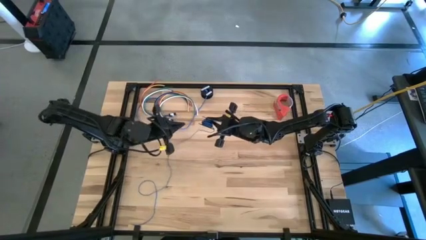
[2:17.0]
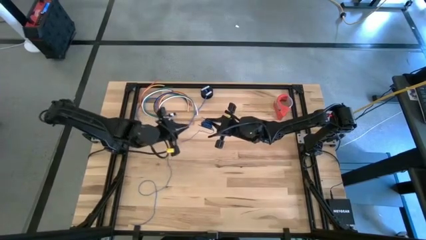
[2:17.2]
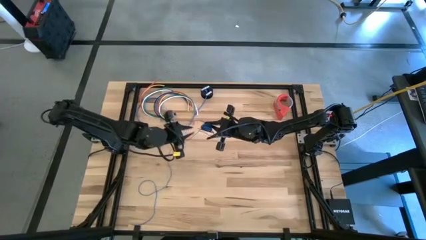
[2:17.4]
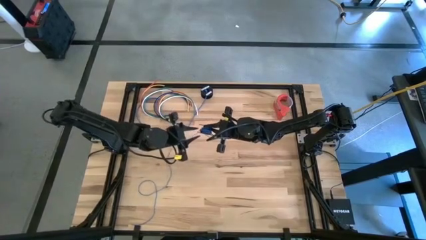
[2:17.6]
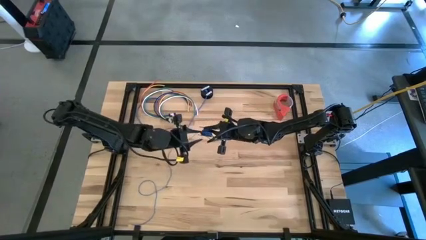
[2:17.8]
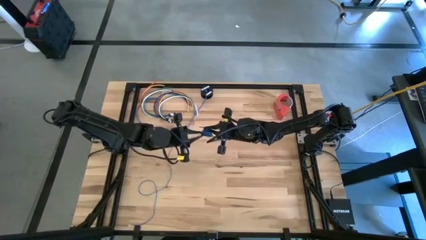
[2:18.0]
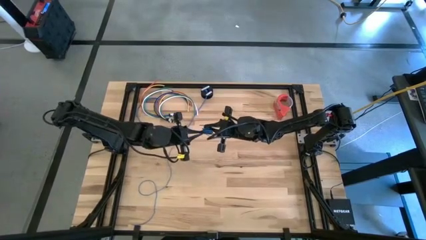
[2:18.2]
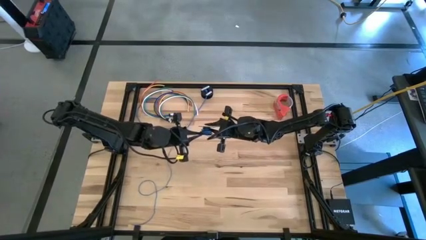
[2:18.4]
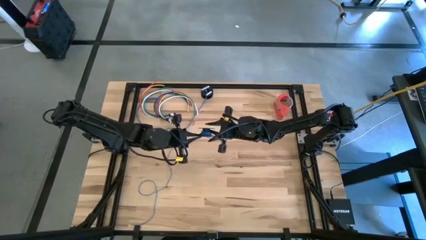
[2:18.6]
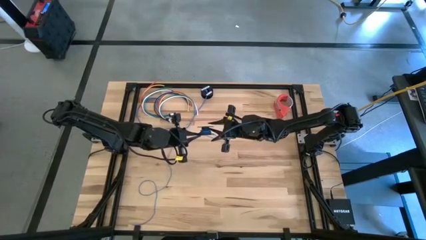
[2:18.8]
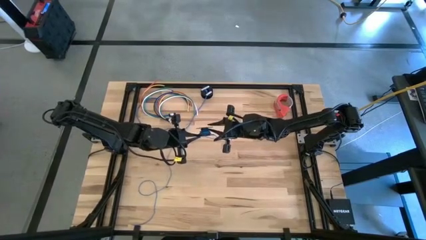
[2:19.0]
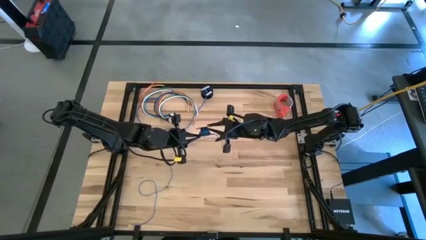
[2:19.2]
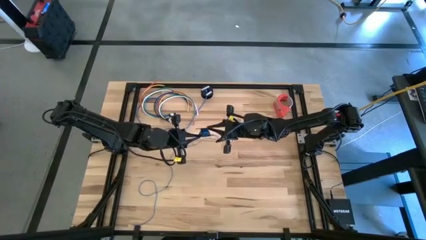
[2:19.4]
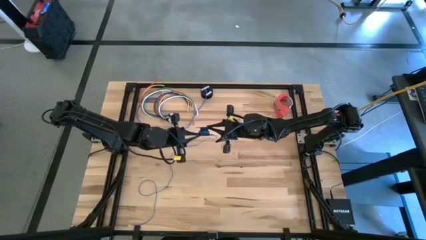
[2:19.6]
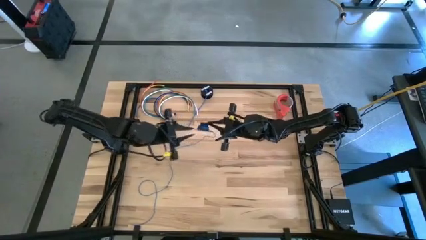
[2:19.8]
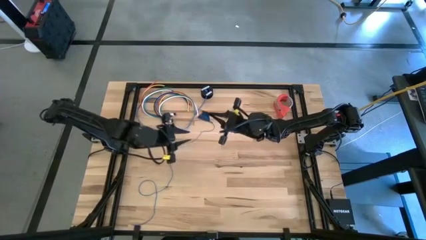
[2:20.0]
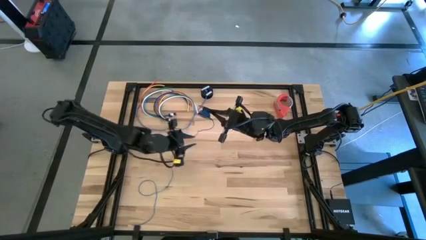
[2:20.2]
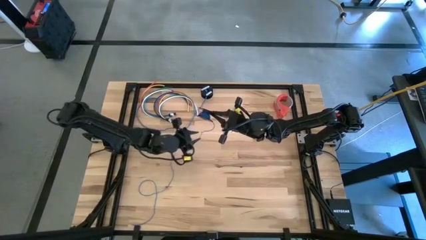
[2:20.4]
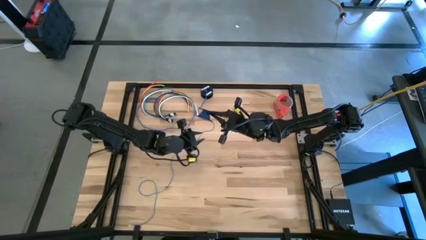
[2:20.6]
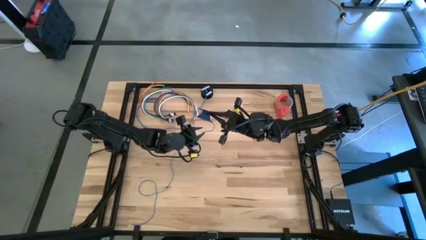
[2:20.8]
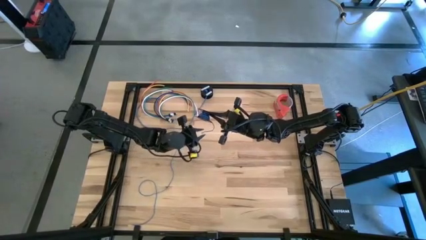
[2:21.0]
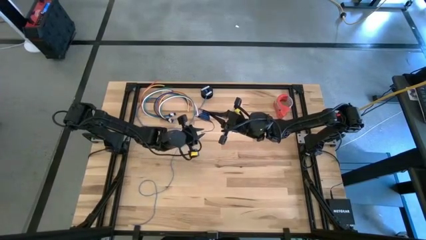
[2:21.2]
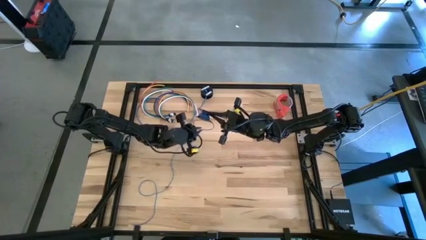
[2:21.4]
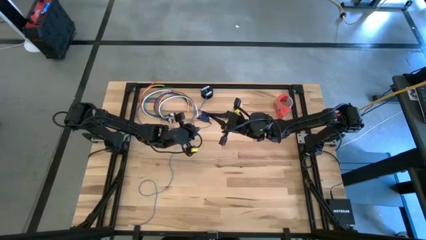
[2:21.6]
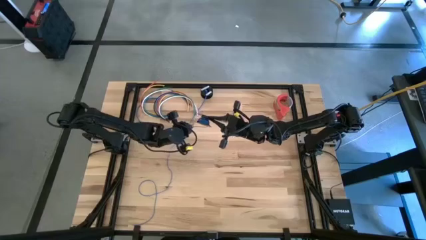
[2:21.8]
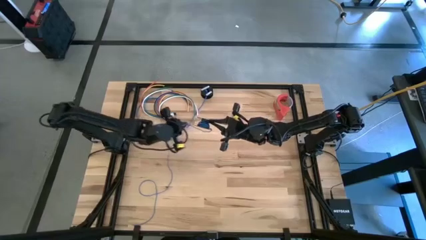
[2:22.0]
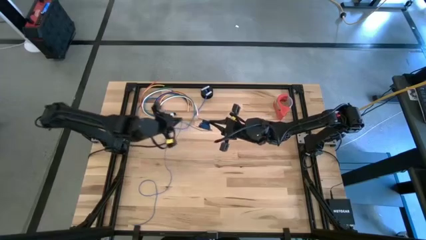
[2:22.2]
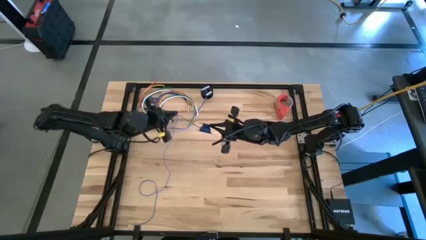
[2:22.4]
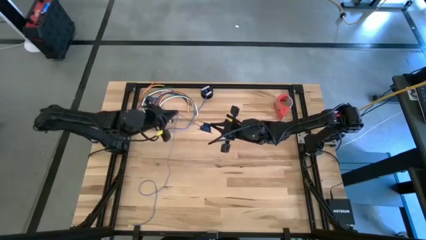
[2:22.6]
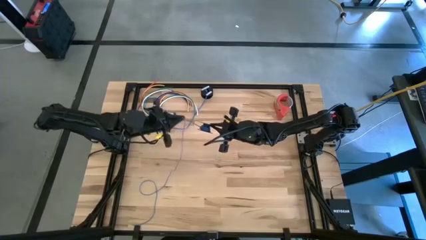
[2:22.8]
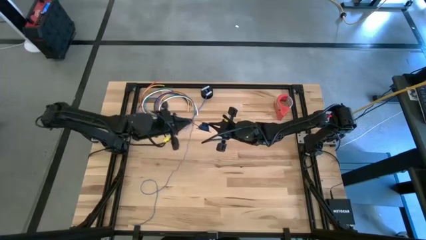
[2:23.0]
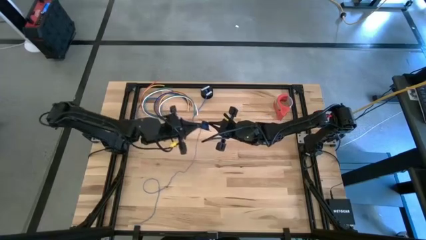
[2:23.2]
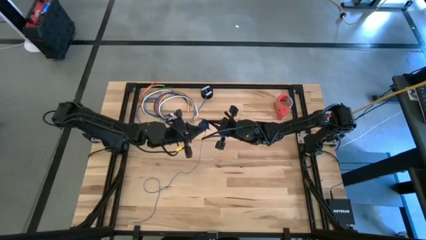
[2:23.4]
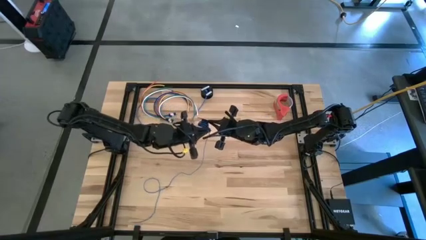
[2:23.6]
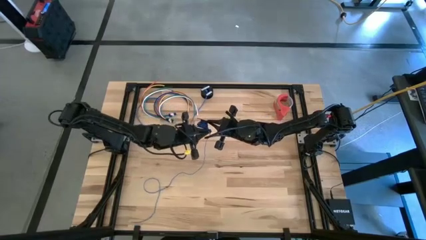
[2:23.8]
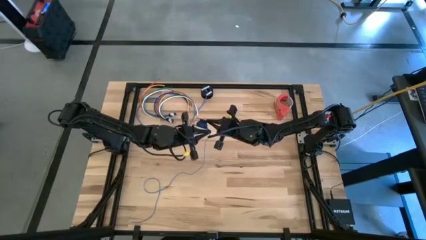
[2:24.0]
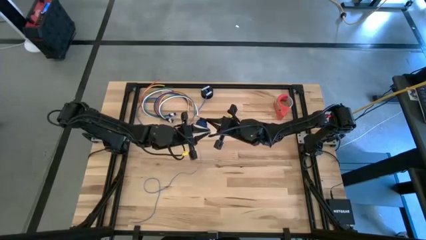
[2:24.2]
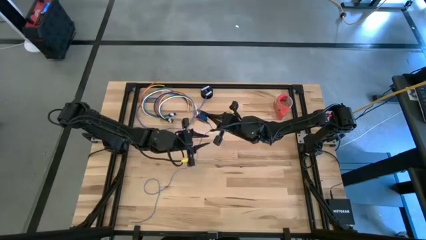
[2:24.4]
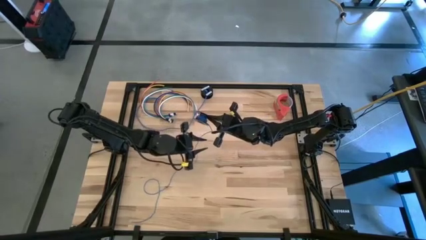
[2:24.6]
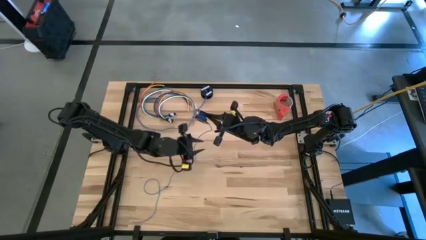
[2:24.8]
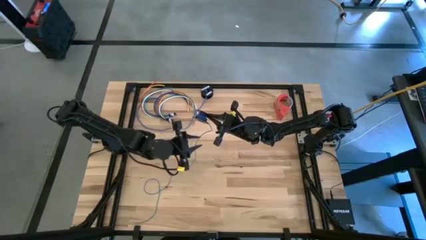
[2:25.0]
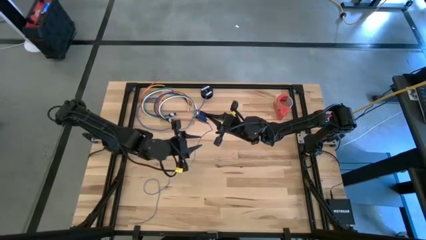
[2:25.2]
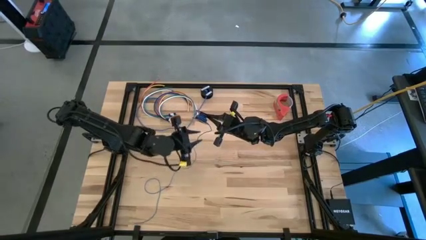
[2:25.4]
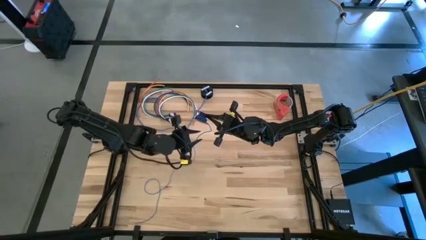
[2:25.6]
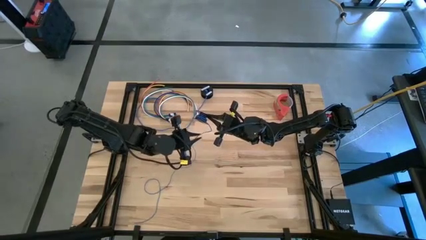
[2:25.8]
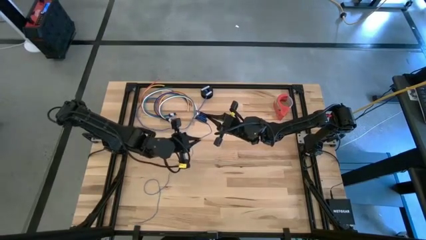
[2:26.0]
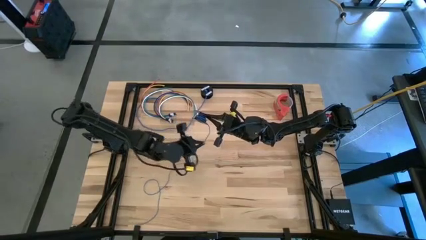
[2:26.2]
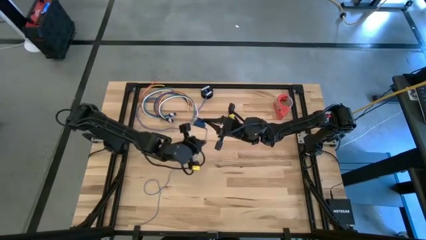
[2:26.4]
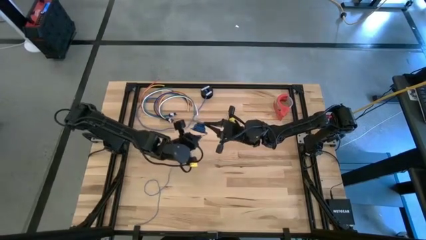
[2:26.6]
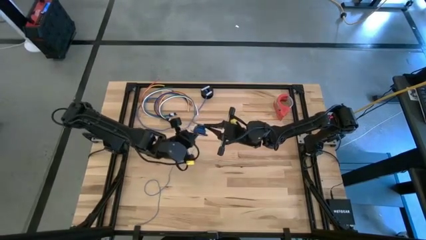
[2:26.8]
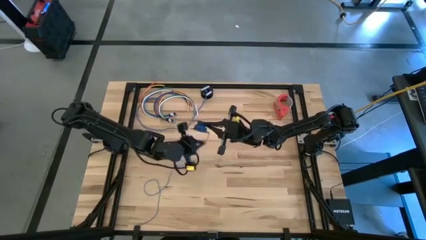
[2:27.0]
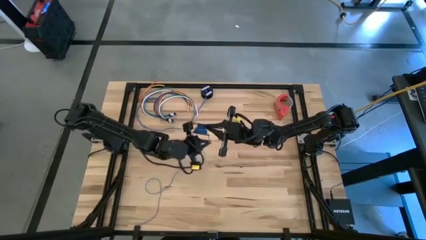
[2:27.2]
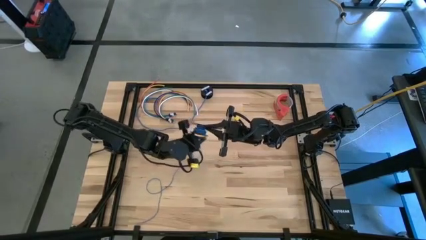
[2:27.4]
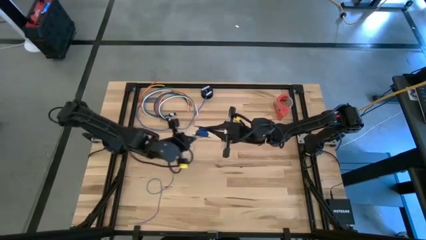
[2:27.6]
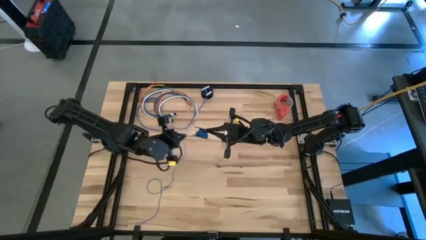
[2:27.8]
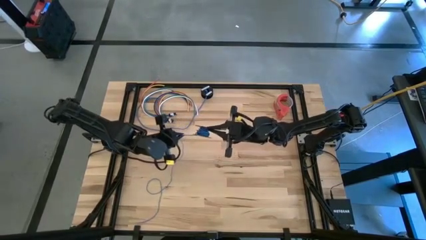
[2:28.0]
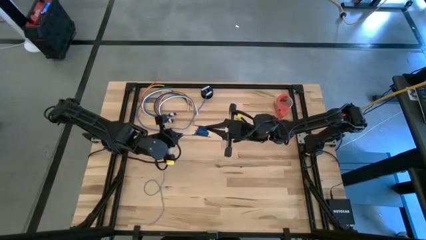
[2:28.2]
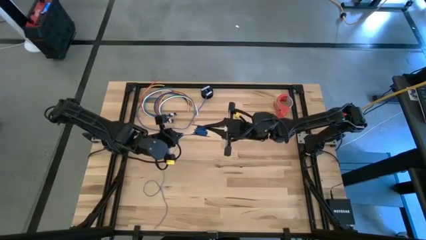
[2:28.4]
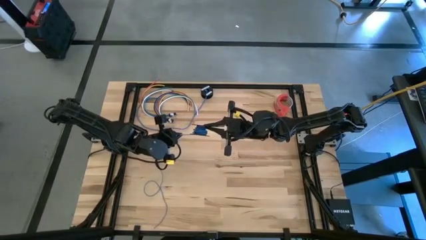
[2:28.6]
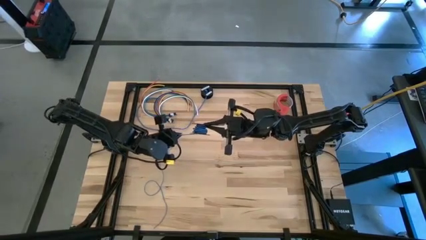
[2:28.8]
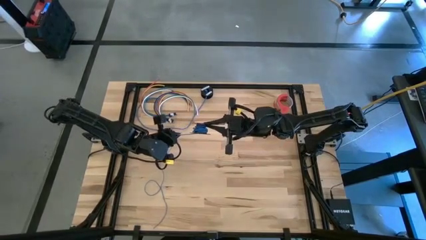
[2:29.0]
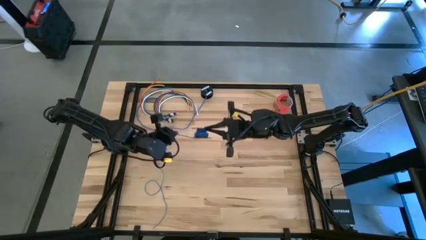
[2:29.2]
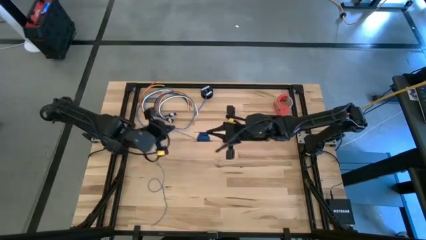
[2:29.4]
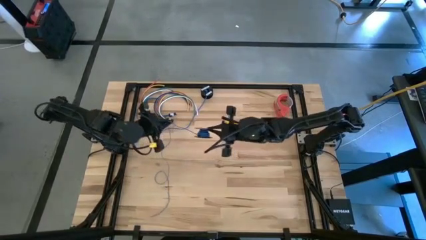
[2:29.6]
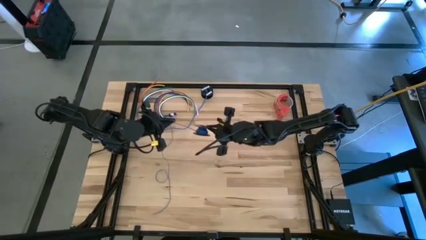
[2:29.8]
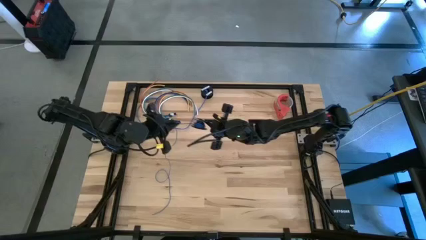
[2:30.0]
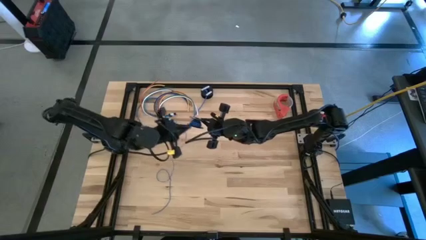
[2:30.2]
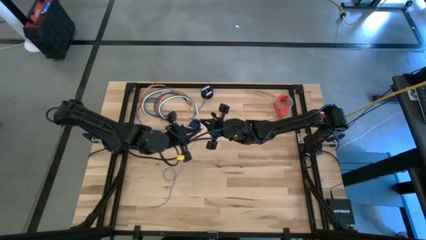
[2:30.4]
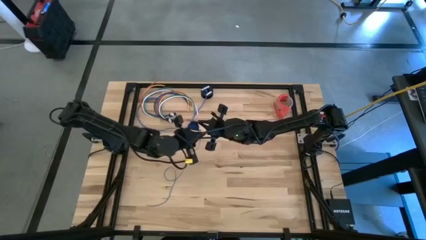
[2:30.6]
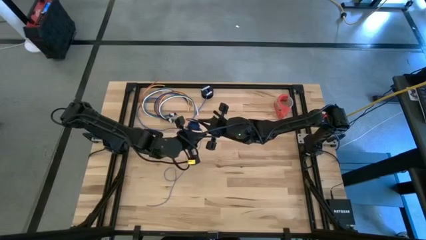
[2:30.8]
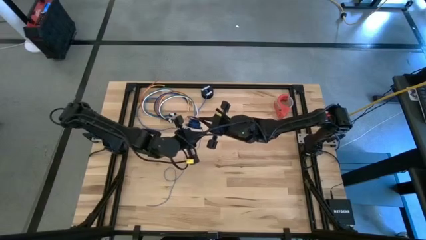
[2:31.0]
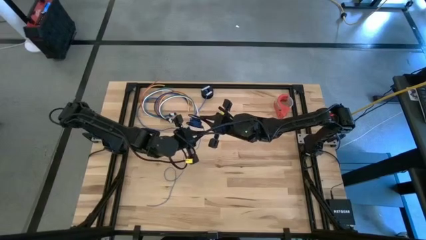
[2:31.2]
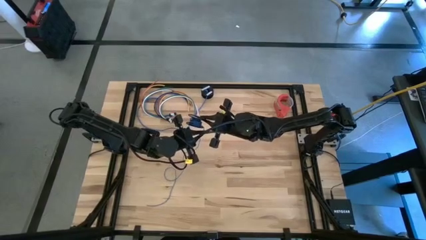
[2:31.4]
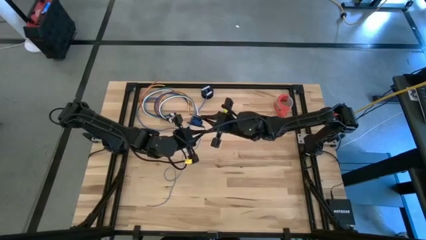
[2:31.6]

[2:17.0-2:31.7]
Task: Coil cords
Coil the blue wire onto the spool

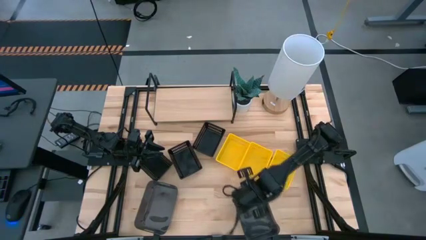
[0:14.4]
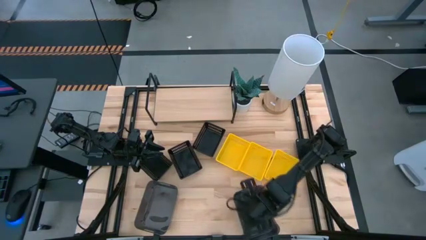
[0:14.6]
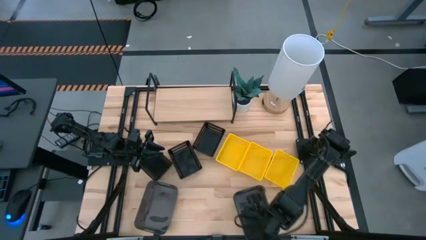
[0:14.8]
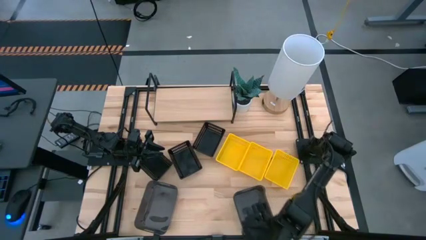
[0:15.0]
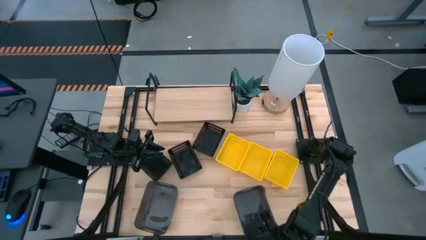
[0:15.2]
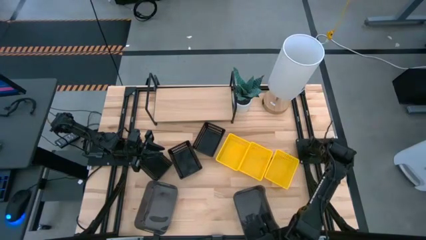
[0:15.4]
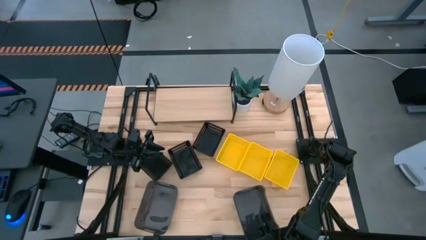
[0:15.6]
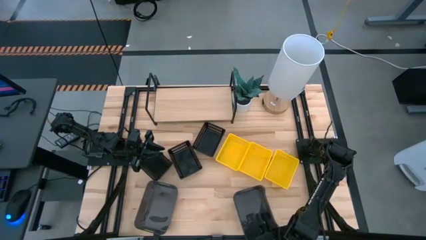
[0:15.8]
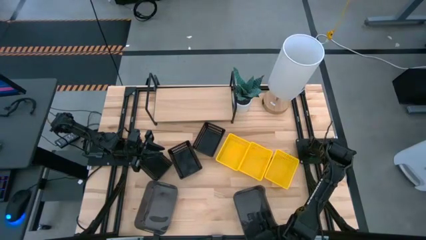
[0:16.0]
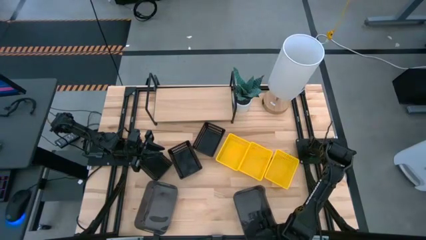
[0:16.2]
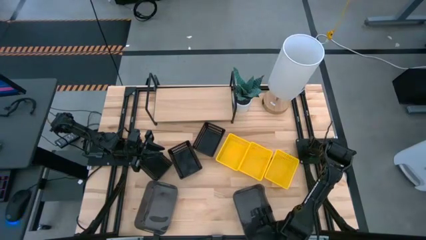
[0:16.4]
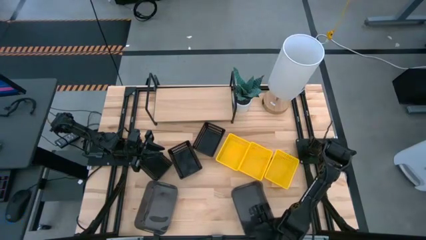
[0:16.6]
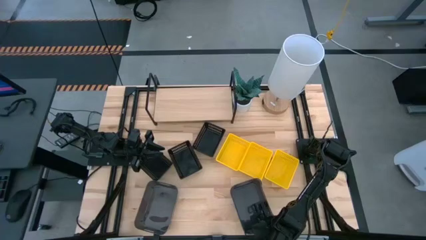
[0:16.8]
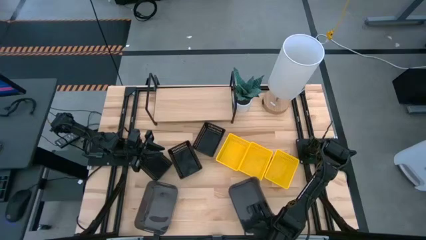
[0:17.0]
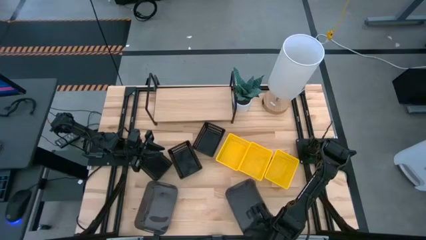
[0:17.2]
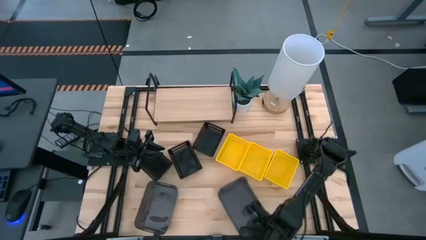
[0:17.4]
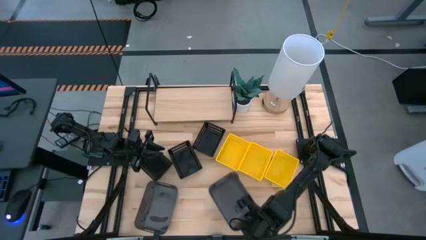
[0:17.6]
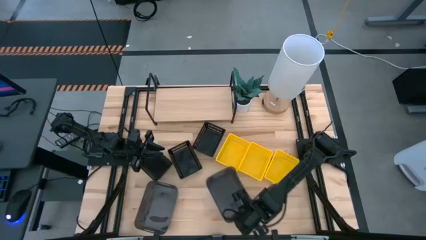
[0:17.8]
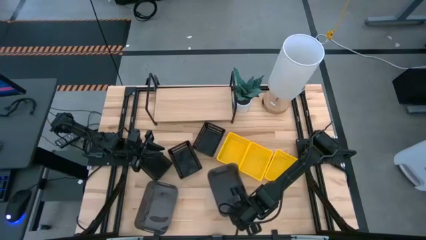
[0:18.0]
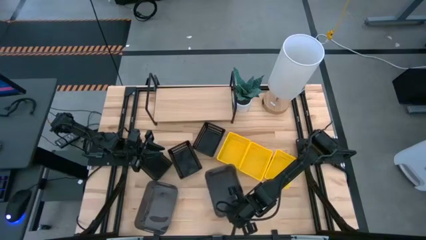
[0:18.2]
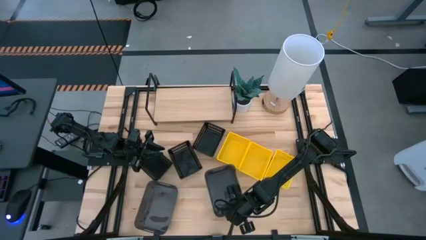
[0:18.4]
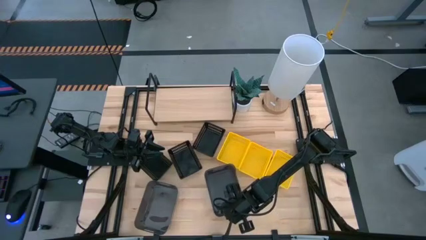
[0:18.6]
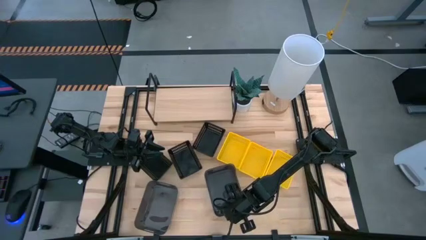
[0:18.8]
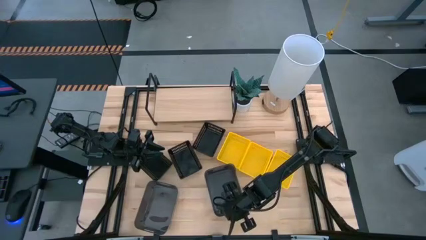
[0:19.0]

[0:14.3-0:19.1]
Task: Stack baskets on shelf by color
Move the stacked gray bins to the center of the table
